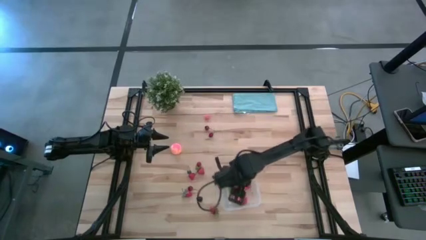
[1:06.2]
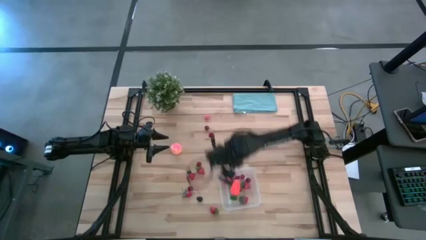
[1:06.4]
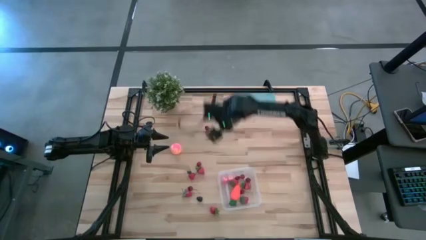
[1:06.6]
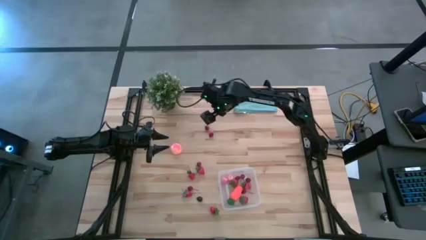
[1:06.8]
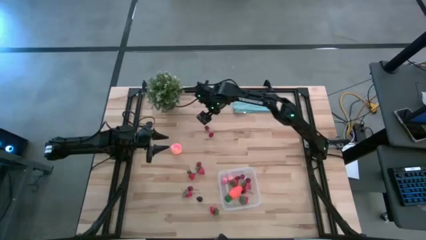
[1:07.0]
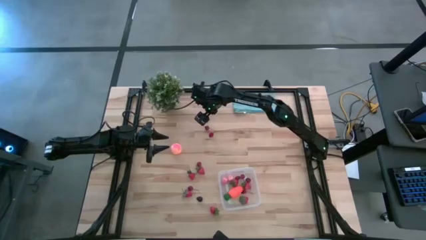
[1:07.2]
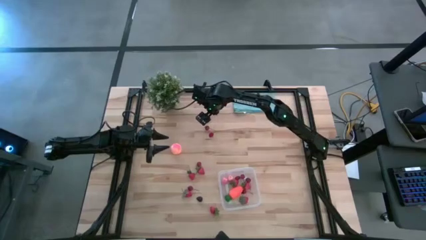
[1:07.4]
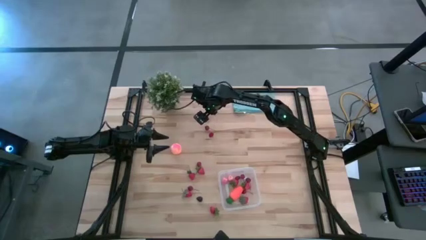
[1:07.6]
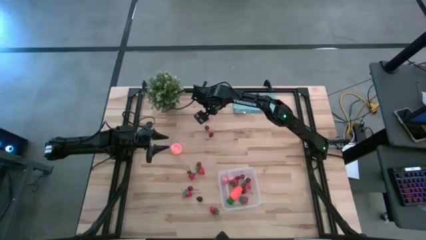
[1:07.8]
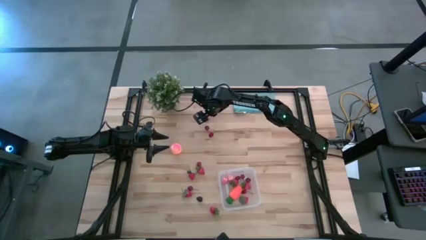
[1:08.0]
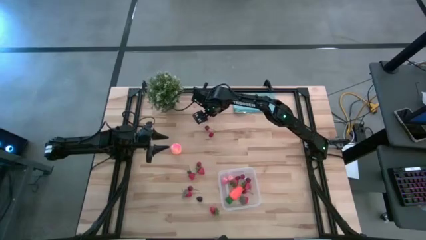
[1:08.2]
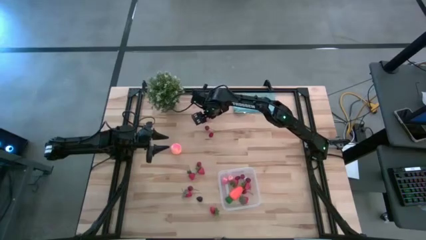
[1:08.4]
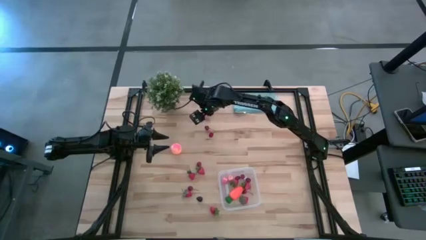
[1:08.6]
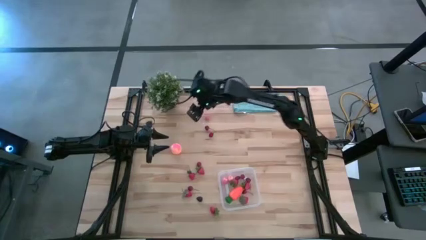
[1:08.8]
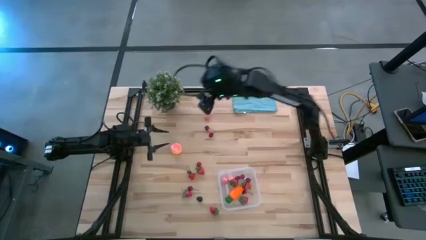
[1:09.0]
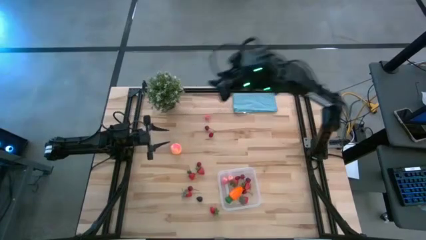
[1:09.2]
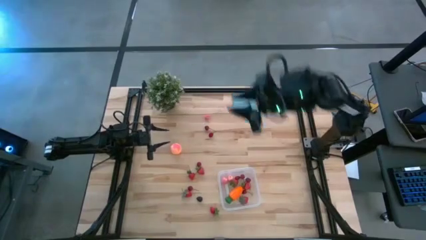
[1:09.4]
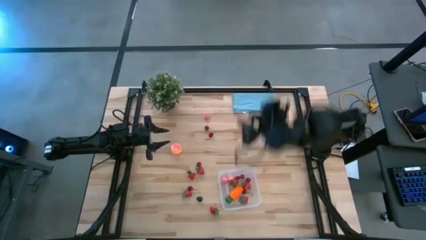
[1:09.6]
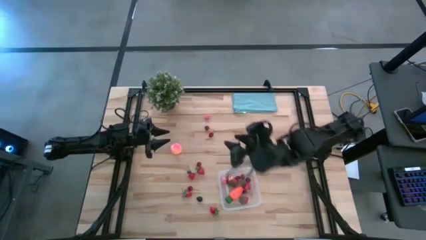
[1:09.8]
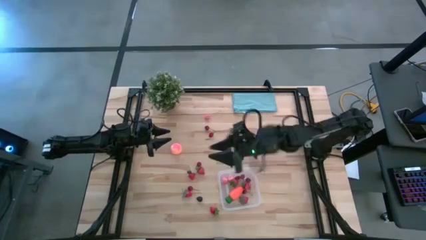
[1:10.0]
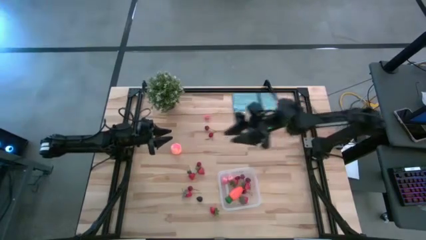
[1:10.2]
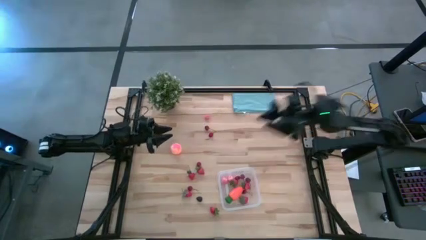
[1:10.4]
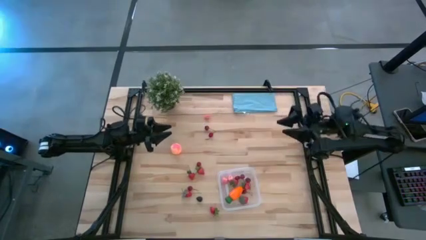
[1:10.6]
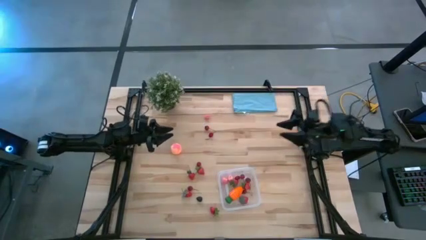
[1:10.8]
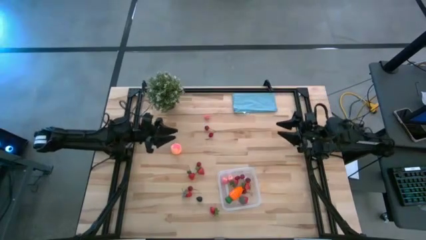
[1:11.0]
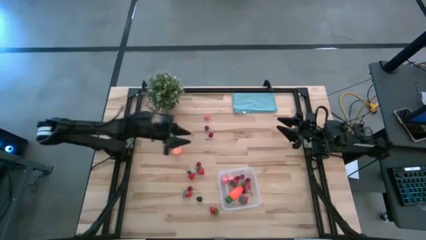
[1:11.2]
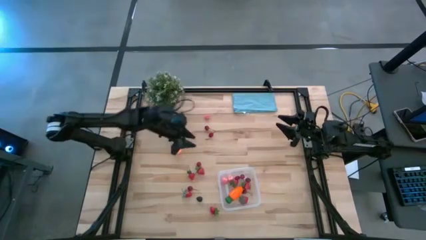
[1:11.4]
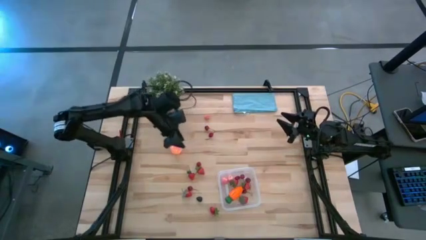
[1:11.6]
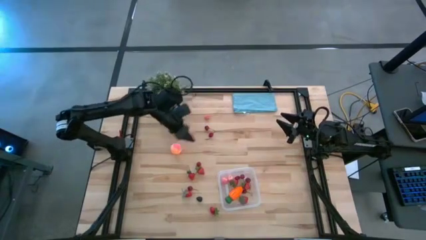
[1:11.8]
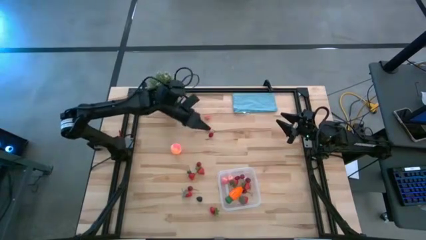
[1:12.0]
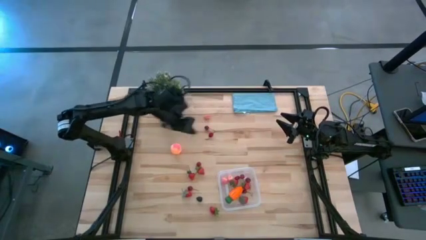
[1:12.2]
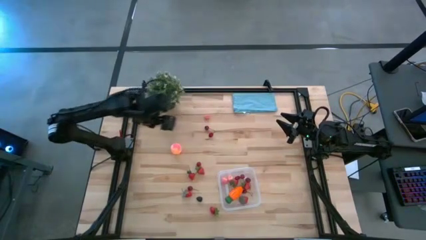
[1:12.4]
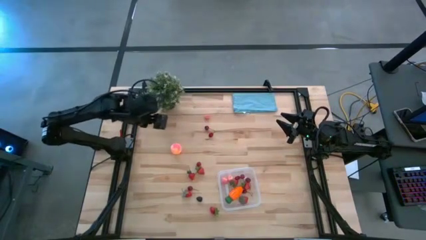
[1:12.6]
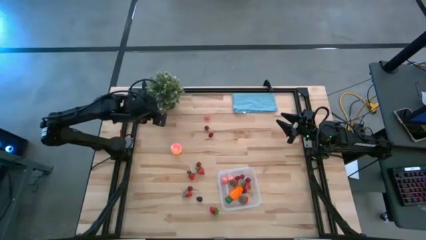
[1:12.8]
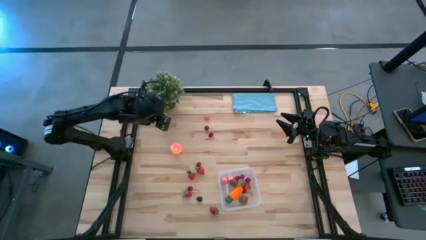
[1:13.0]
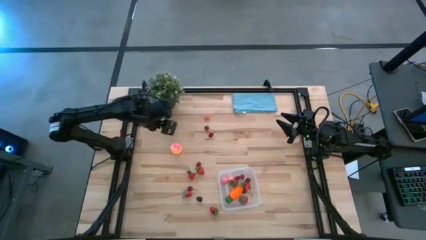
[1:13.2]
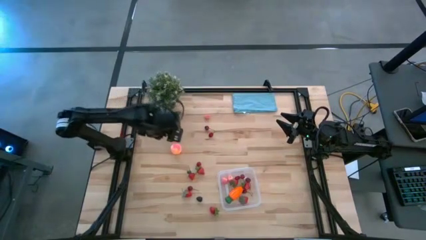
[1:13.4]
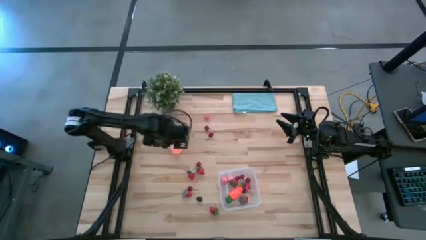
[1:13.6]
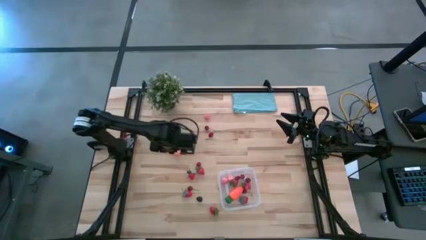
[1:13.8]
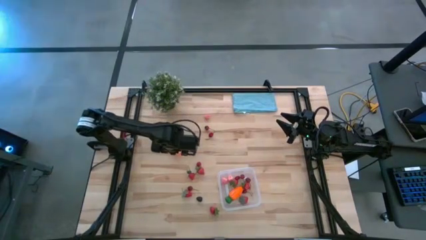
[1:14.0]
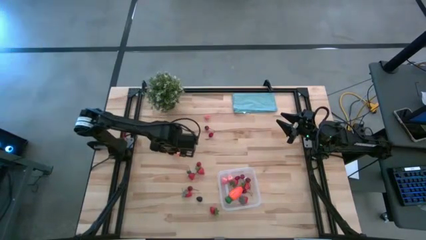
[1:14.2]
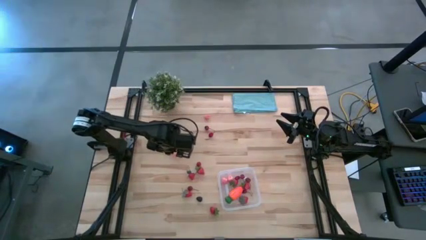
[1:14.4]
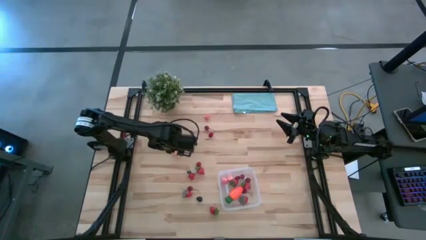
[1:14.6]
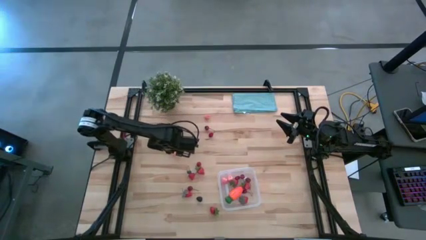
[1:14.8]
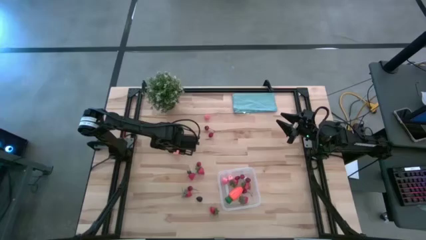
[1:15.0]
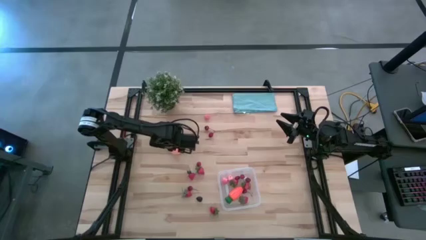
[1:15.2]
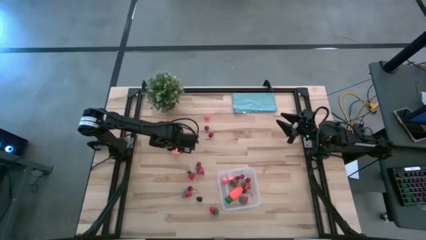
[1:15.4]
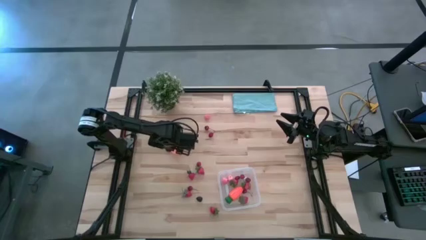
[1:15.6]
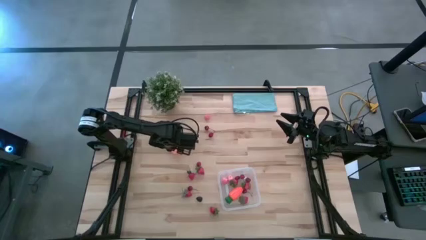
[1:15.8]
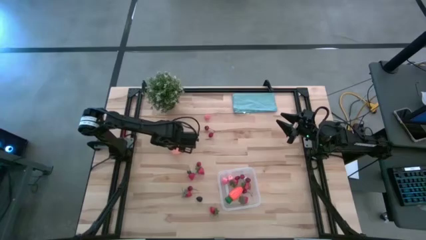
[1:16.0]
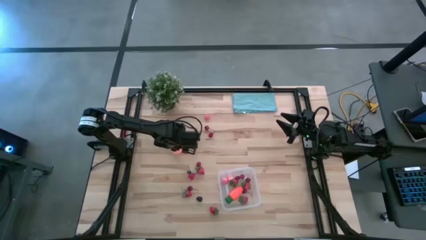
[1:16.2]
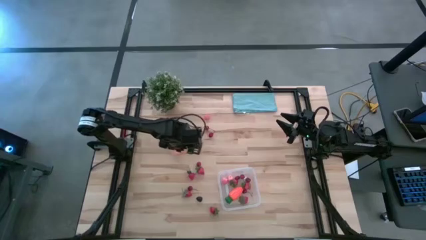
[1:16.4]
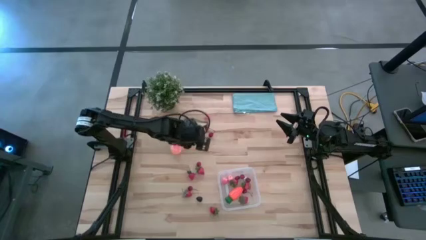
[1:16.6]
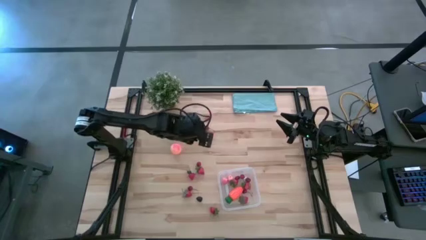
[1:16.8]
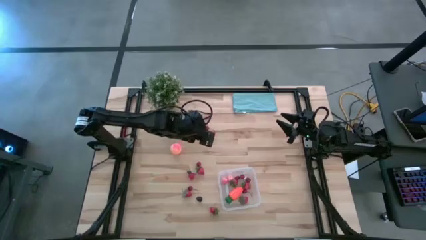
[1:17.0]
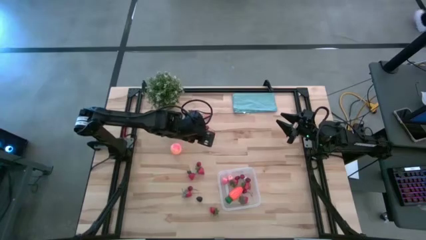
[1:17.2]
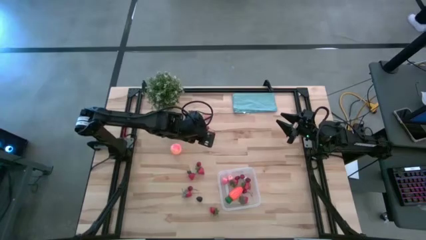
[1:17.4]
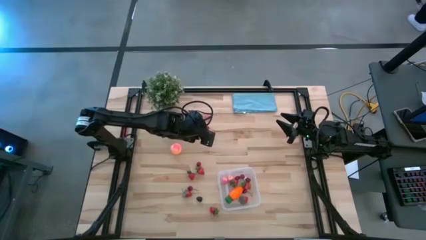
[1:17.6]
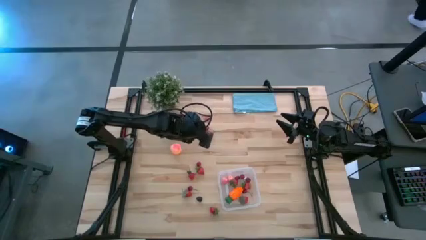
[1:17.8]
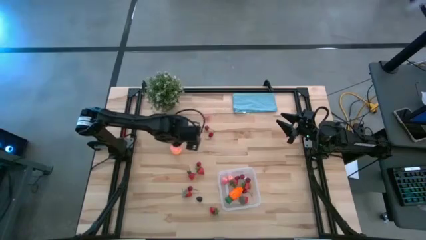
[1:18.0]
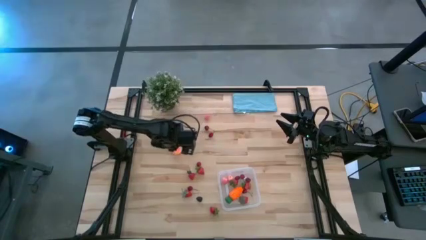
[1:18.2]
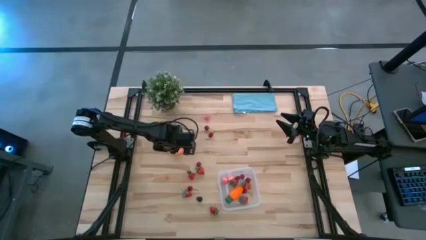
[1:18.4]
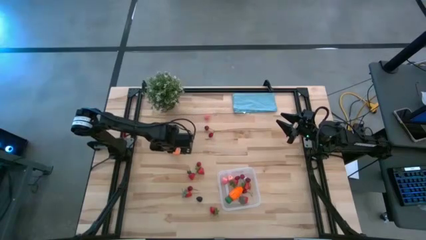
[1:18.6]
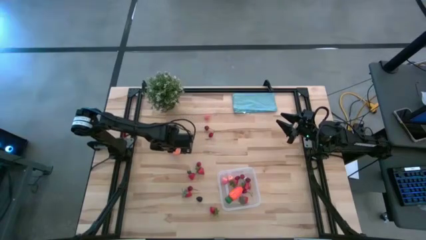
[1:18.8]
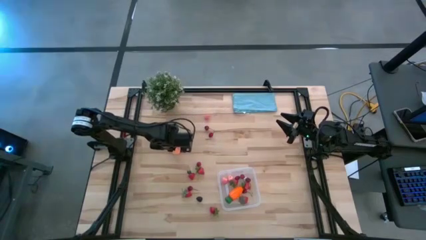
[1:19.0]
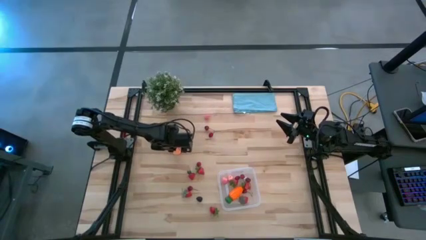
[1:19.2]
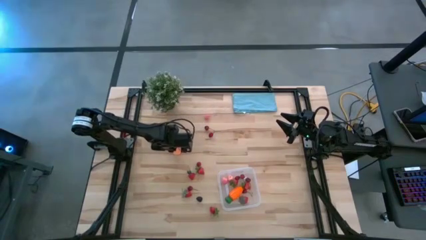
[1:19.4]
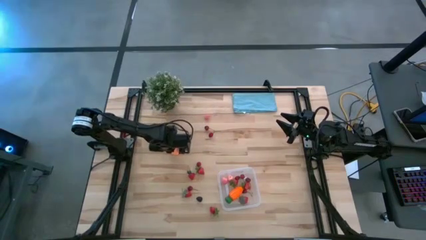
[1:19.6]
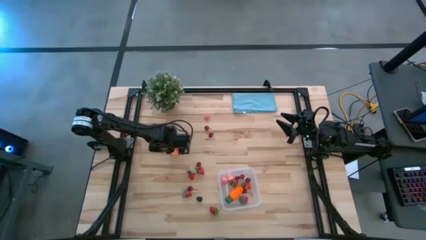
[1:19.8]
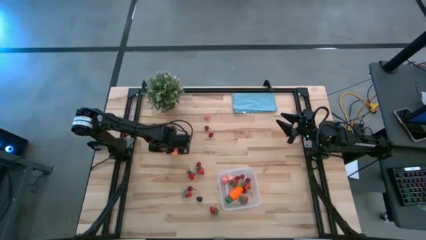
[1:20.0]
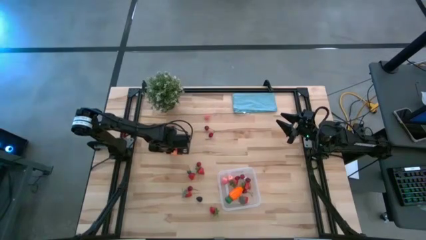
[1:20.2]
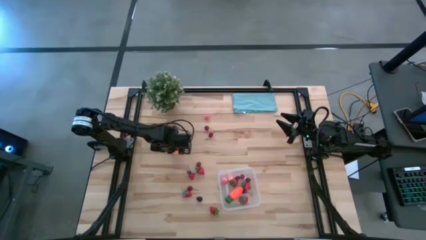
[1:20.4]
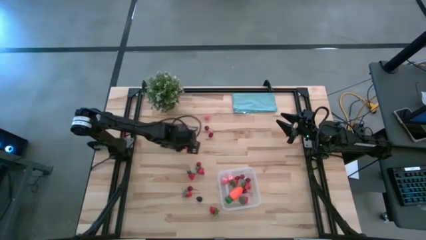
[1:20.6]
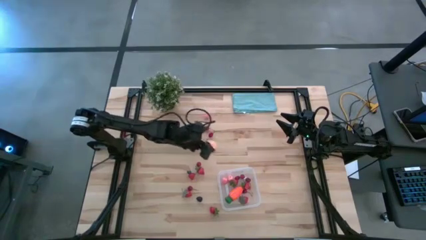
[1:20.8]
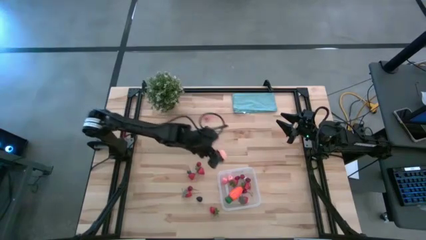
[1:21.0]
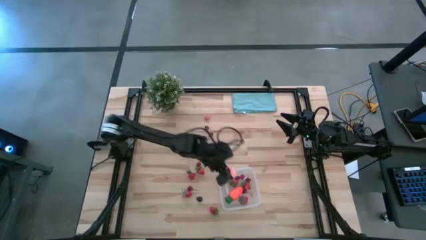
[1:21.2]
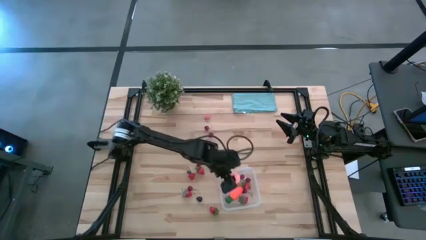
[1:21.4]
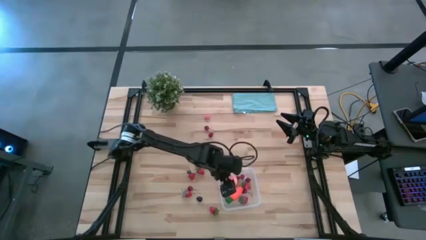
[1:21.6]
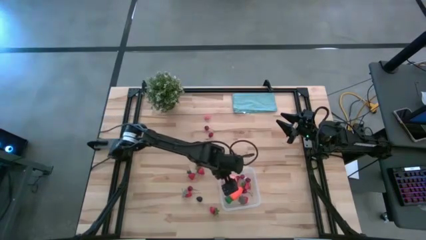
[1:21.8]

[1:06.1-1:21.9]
Task: Pick and placing Produce into tupperware
Put the pink peach into the transparent container

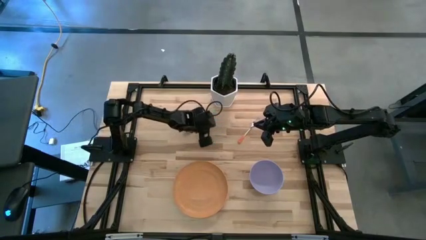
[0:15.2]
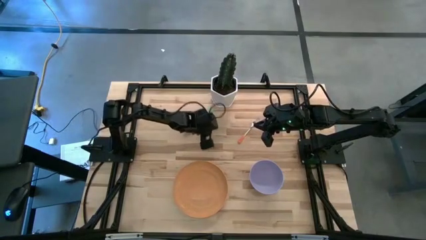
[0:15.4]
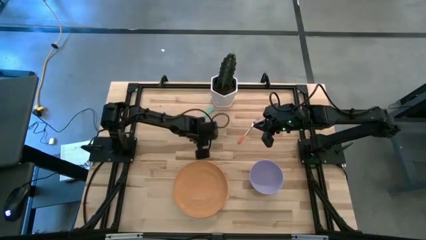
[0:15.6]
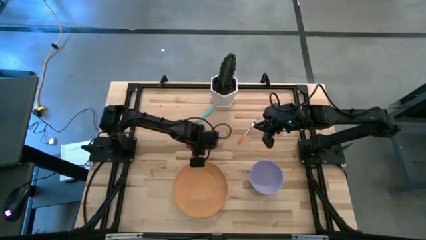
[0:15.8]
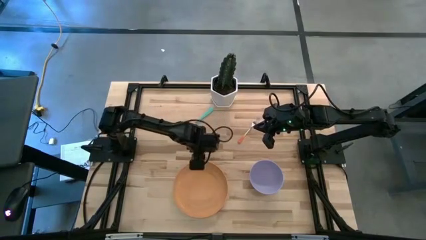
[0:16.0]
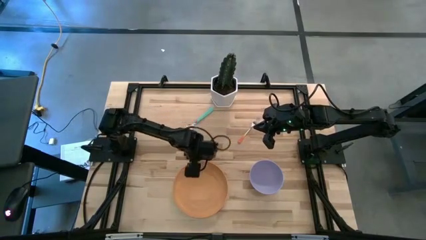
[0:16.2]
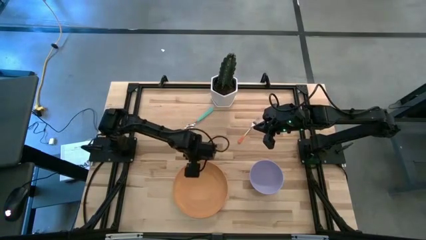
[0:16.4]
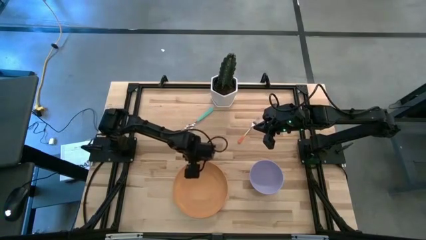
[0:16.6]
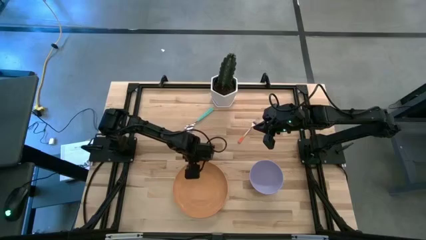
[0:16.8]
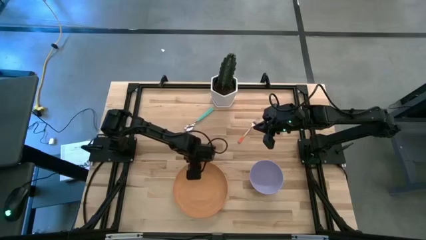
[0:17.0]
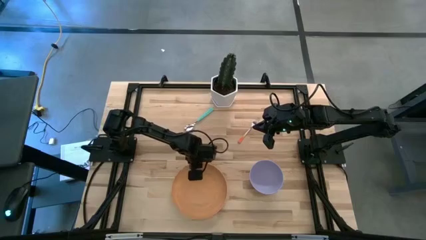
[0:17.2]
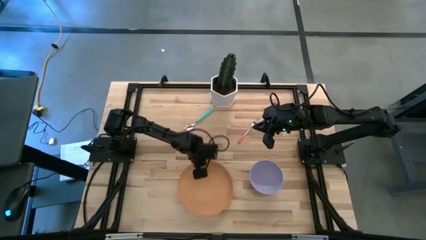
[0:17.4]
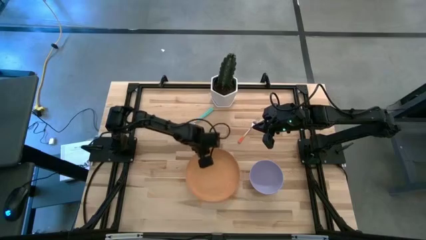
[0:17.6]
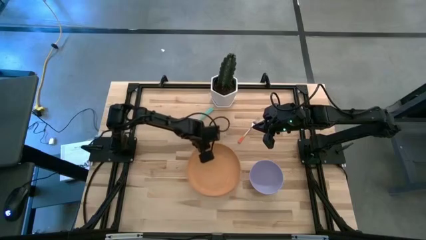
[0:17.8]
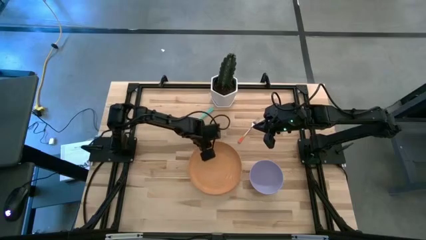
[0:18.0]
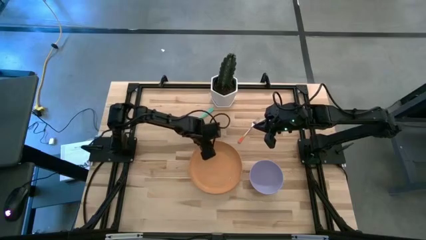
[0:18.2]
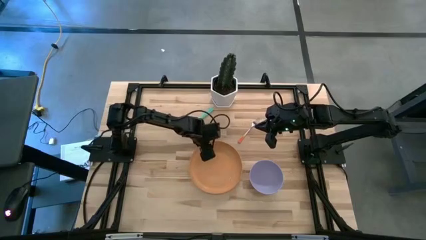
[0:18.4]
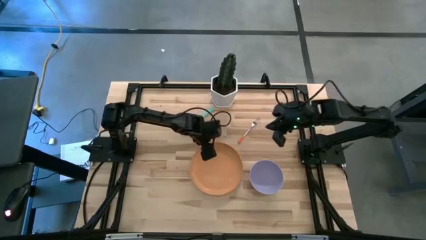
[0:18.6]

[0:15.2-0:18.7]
Task: Set table place
Move the orange plate to the center of the table
